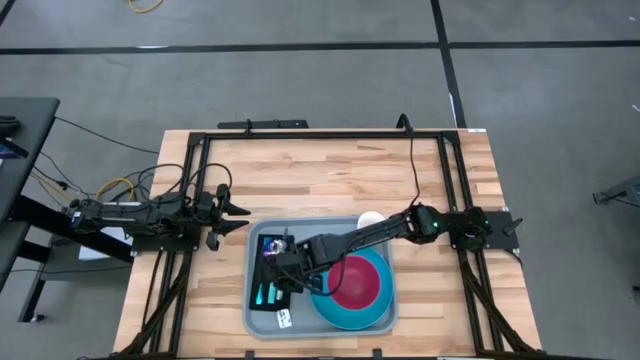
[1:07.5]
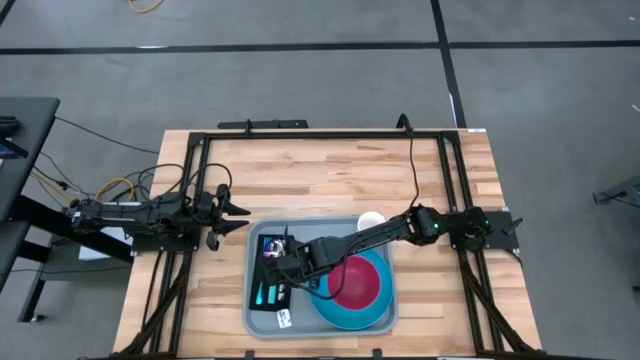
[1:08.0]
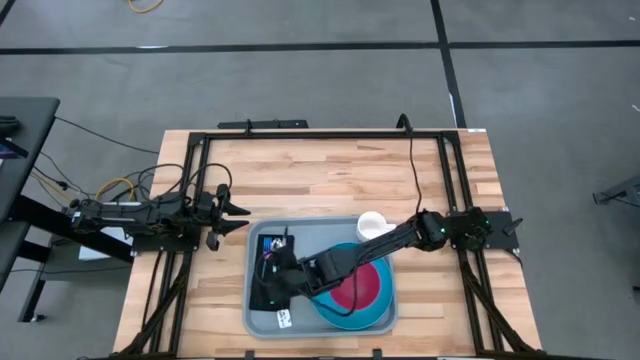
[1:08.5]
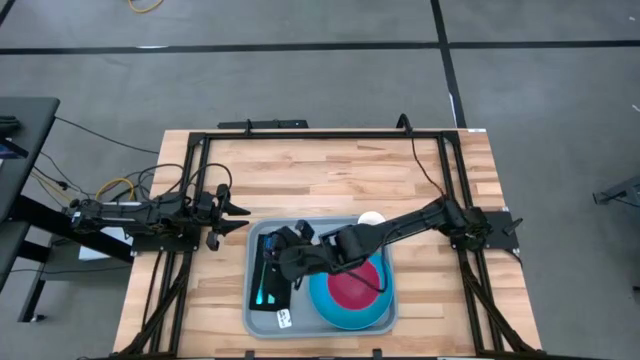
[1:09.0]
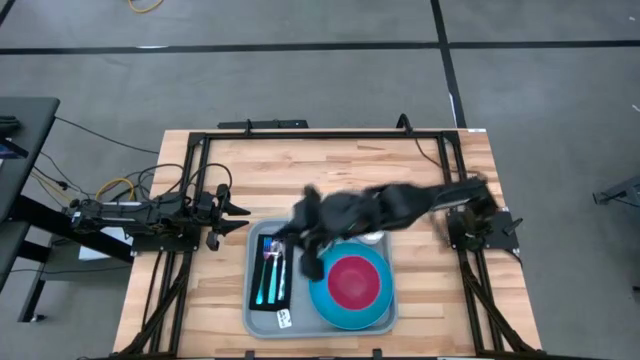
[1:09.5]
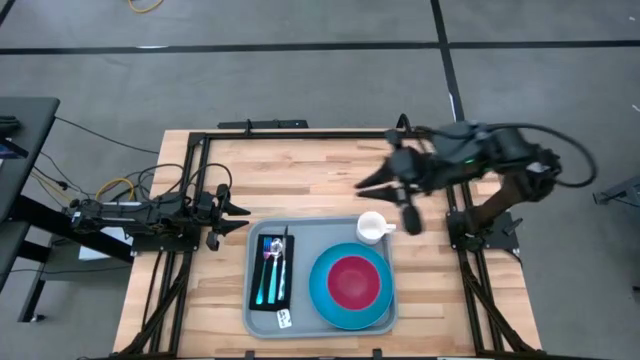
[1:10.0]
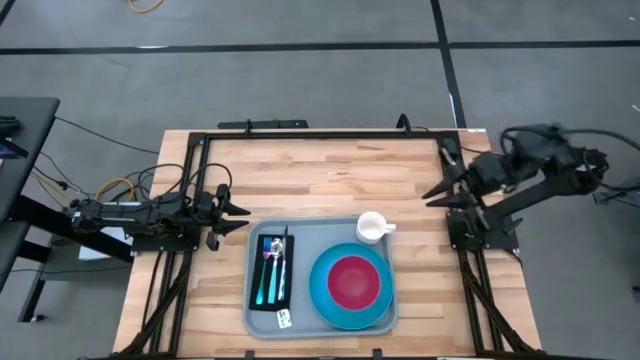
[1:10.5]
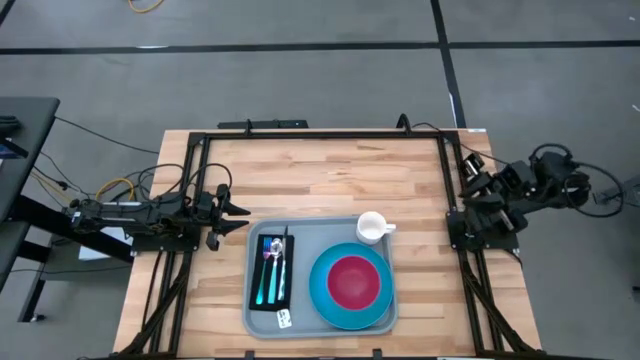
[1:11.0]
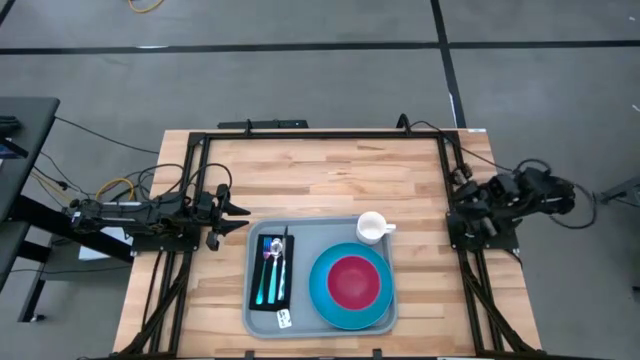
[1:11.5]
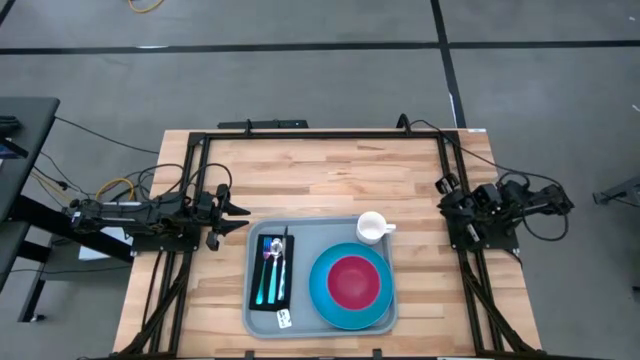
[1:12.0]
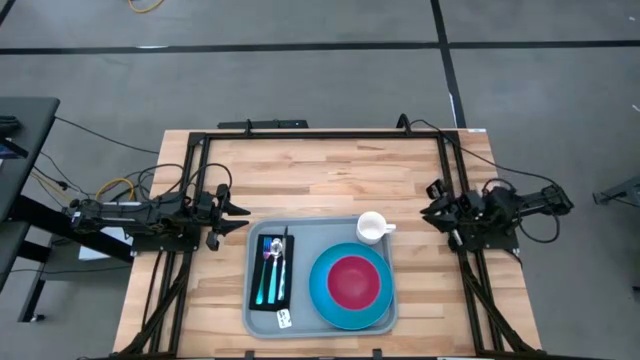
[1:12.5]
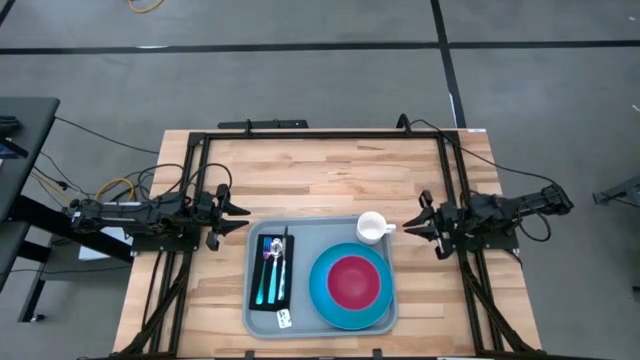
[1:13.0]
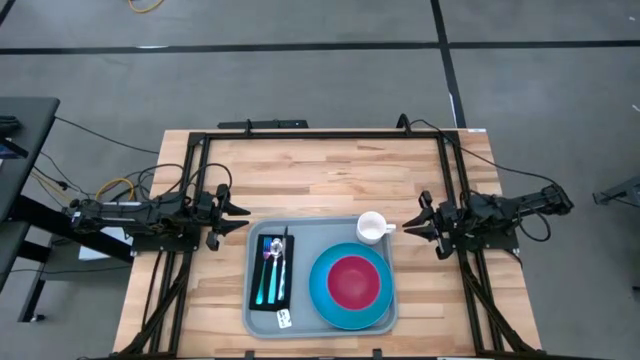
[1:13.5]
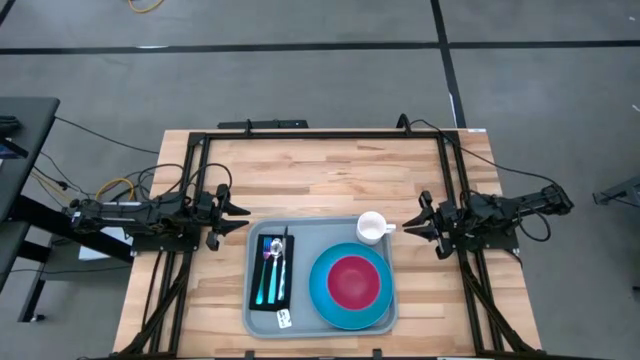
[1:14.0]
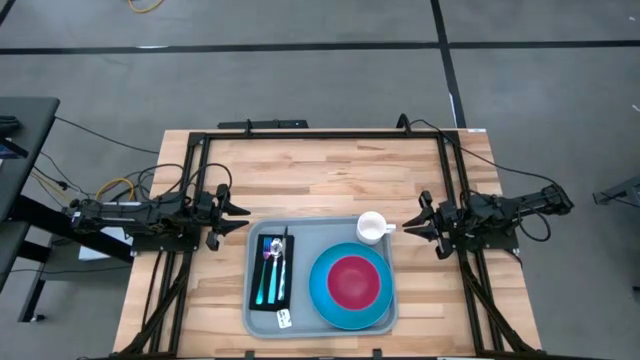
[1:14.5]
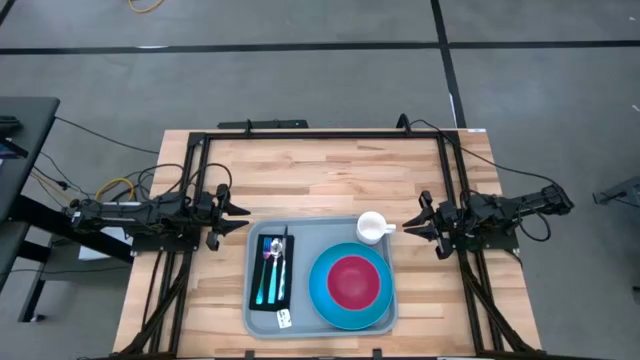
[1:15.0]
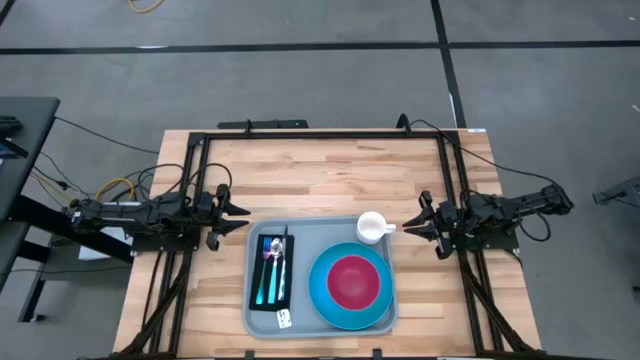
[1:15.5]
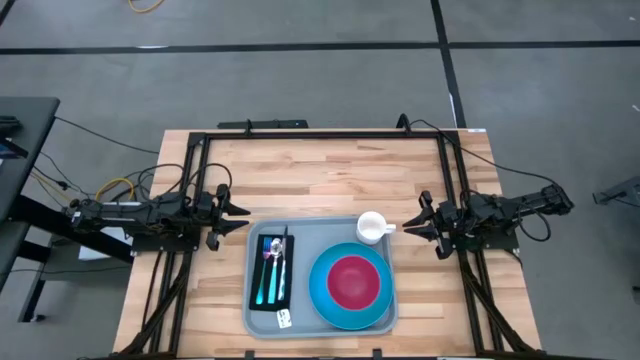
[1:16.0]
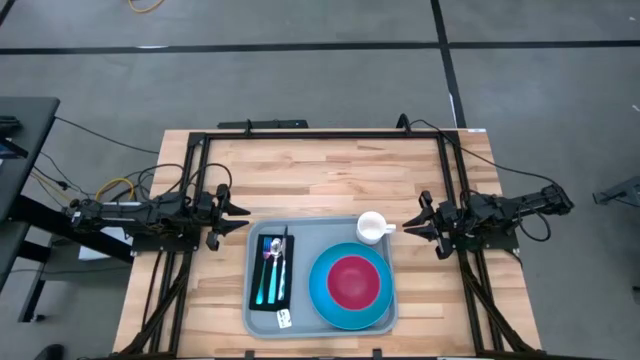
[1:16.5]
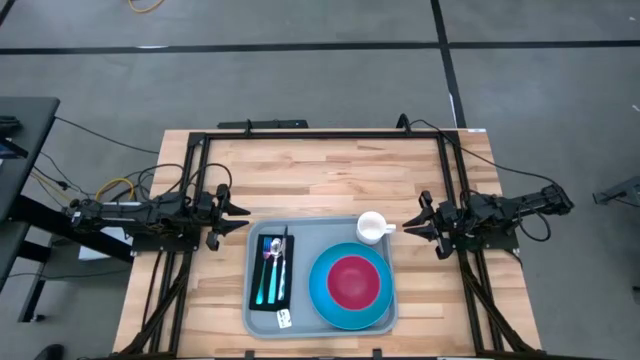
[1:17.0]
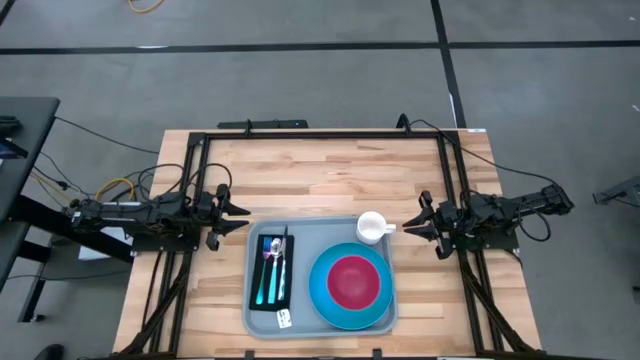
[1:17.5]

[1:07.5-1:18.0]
Task: Set up tray
Return to Home Position
